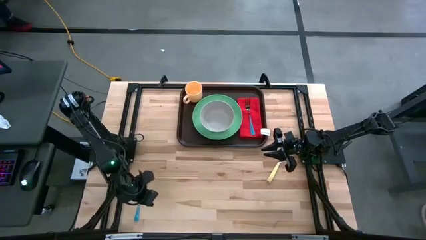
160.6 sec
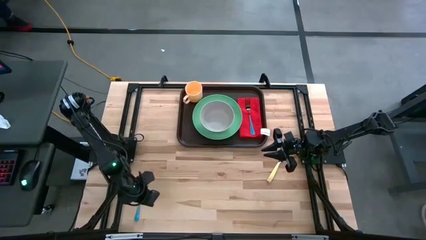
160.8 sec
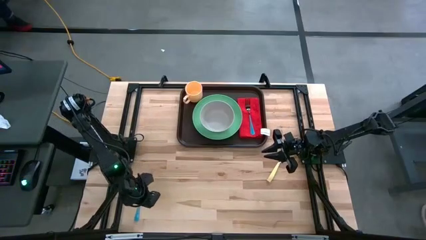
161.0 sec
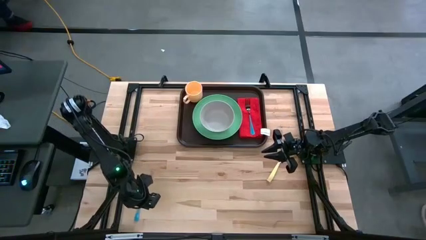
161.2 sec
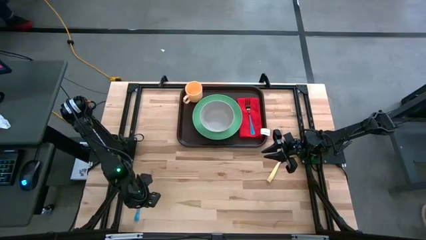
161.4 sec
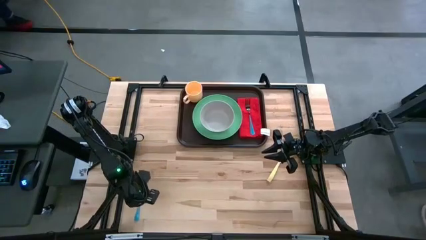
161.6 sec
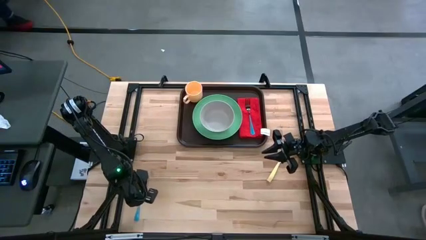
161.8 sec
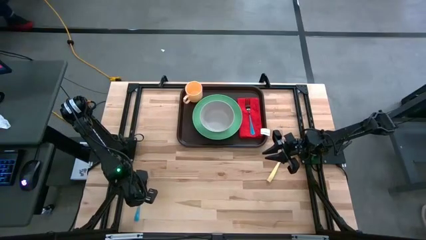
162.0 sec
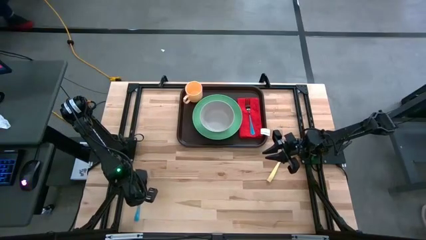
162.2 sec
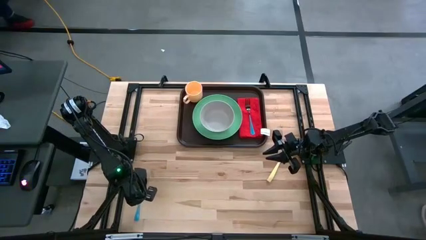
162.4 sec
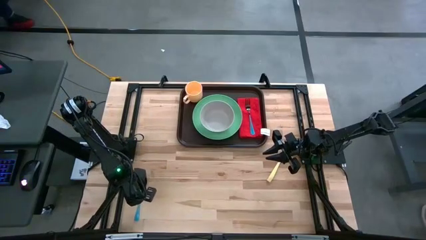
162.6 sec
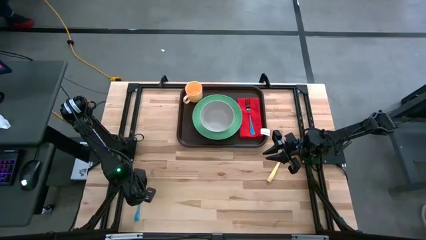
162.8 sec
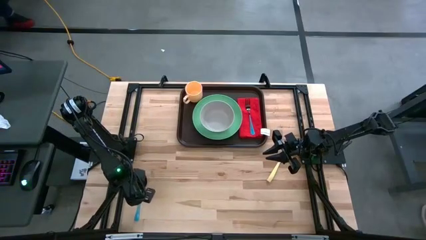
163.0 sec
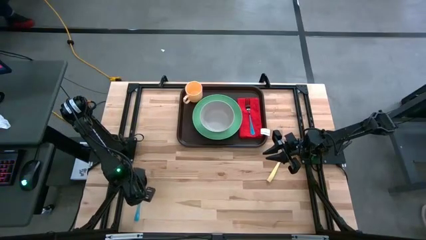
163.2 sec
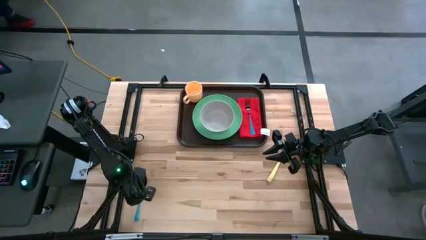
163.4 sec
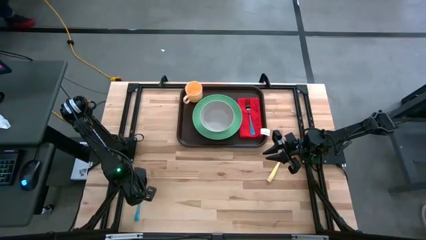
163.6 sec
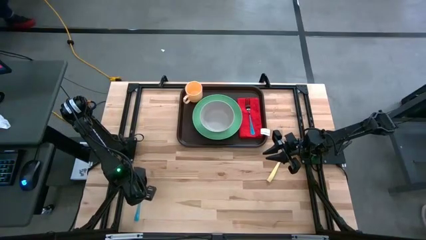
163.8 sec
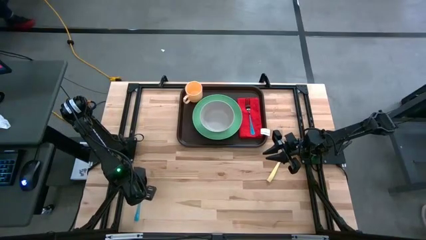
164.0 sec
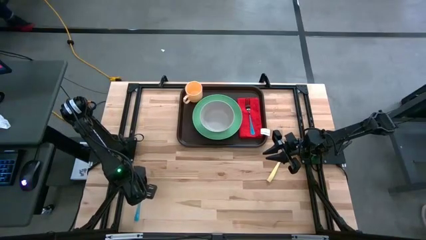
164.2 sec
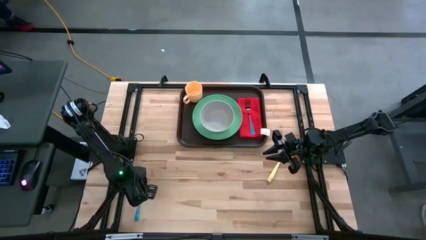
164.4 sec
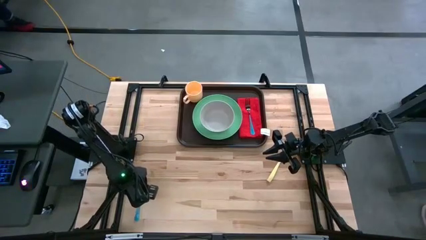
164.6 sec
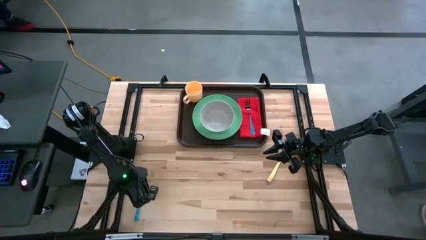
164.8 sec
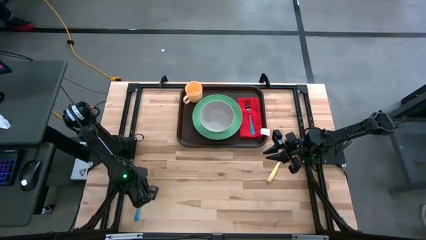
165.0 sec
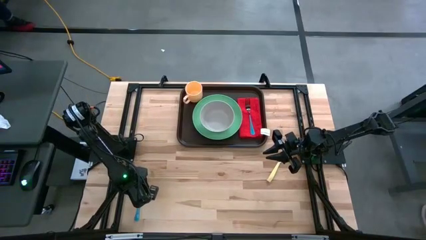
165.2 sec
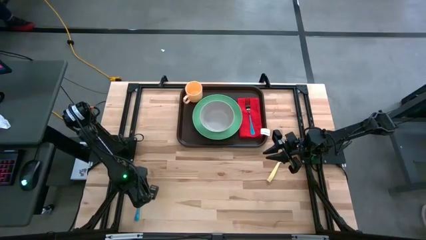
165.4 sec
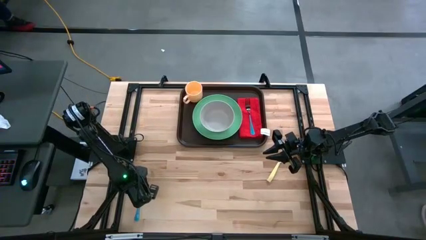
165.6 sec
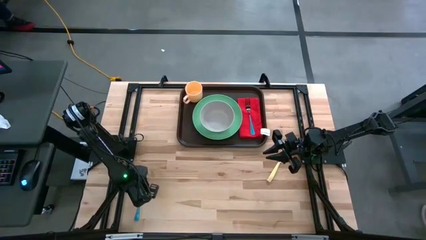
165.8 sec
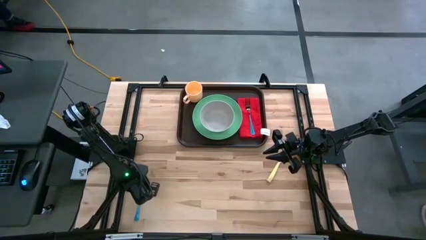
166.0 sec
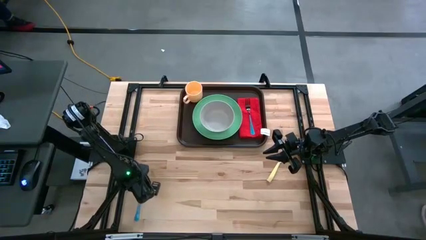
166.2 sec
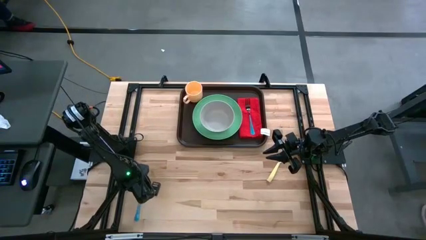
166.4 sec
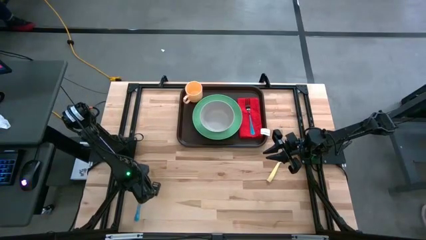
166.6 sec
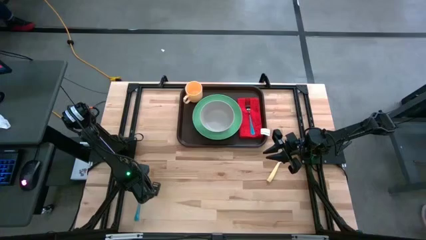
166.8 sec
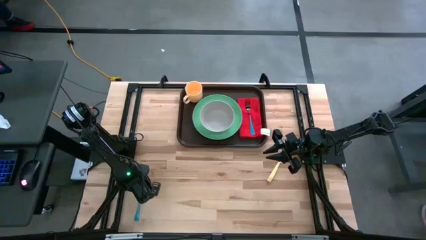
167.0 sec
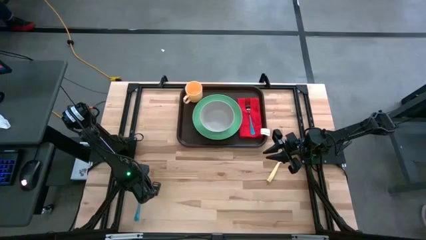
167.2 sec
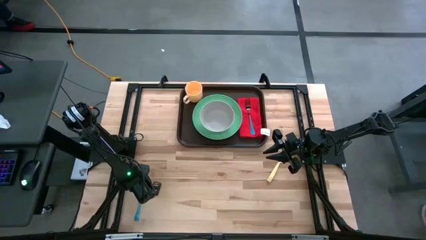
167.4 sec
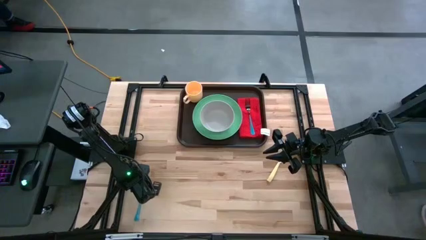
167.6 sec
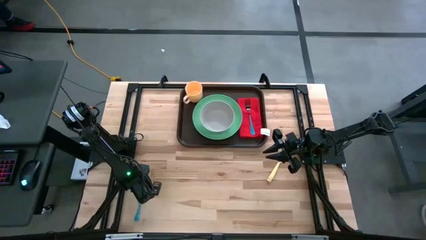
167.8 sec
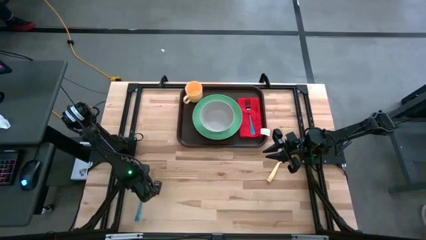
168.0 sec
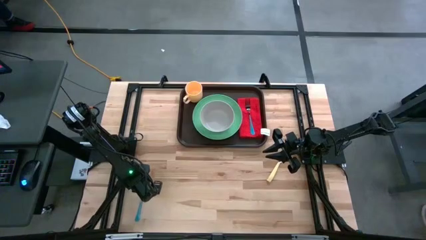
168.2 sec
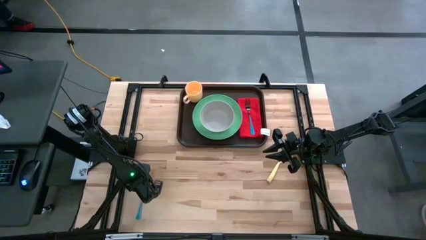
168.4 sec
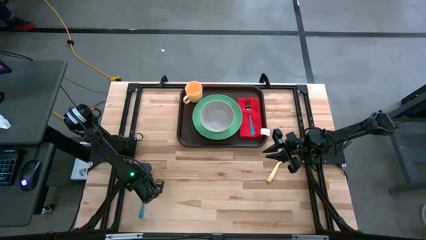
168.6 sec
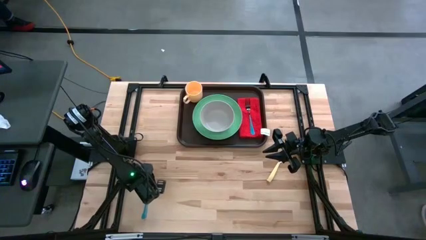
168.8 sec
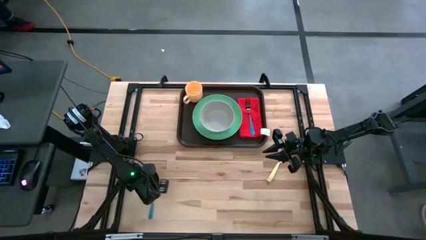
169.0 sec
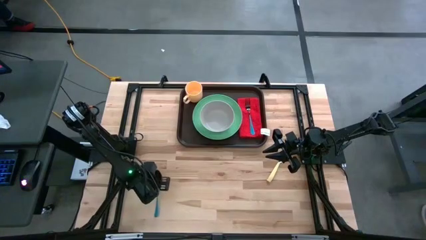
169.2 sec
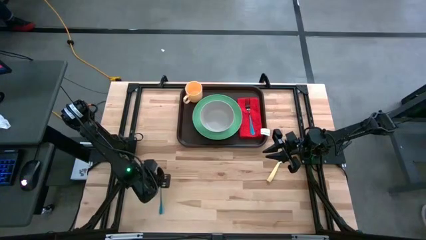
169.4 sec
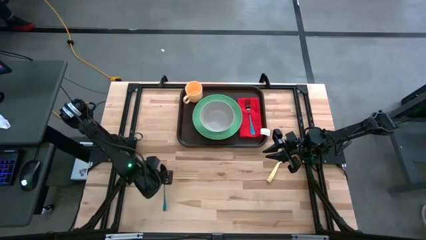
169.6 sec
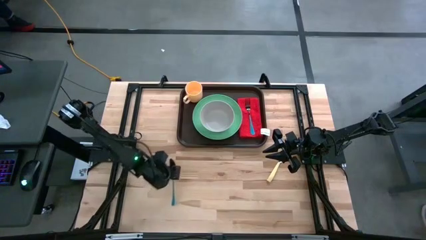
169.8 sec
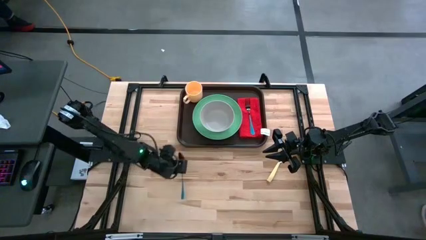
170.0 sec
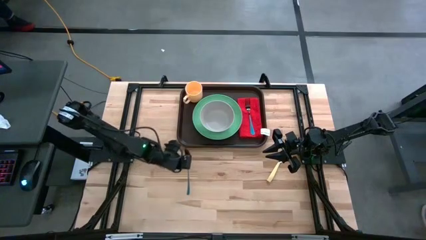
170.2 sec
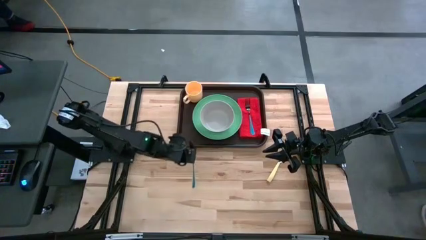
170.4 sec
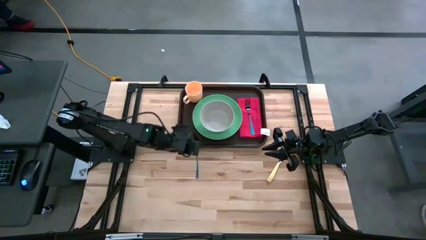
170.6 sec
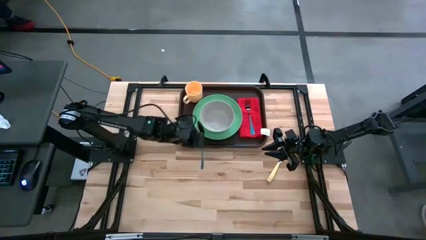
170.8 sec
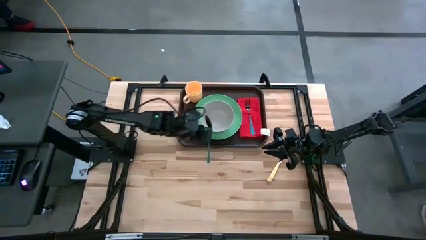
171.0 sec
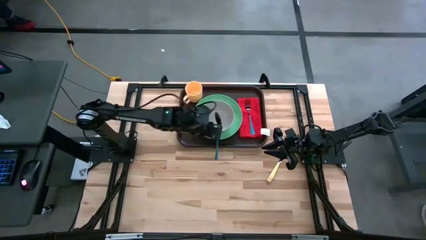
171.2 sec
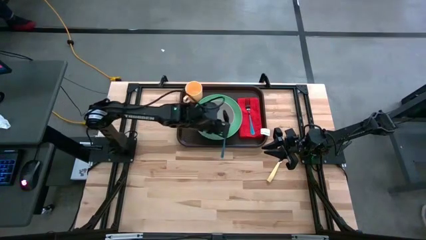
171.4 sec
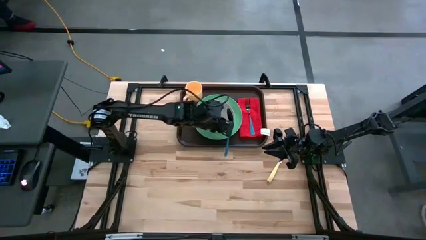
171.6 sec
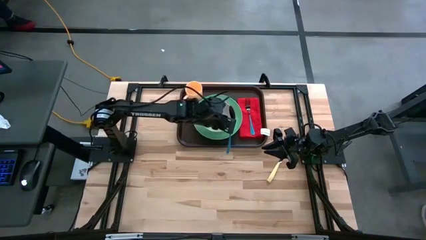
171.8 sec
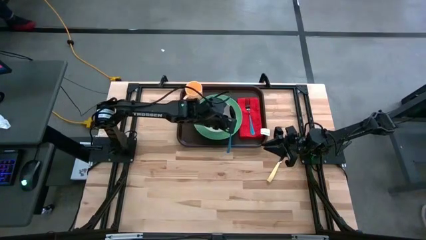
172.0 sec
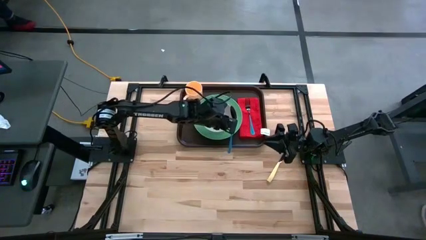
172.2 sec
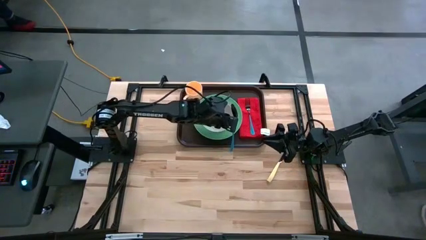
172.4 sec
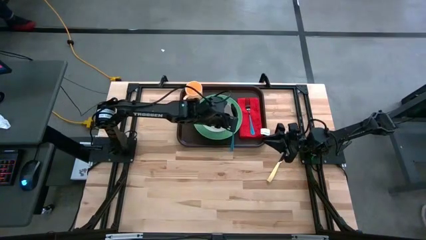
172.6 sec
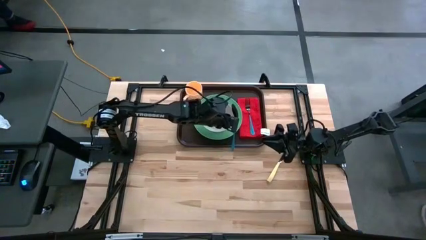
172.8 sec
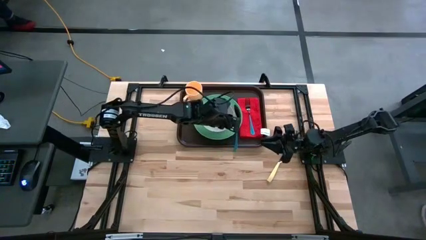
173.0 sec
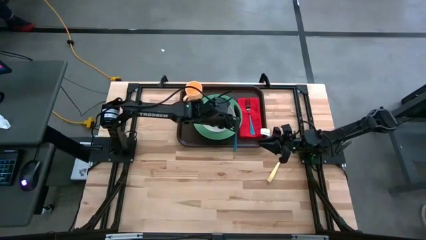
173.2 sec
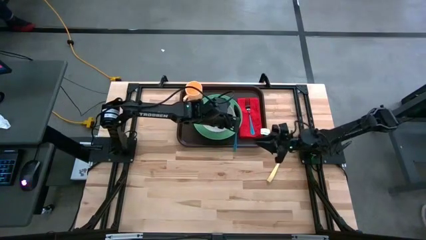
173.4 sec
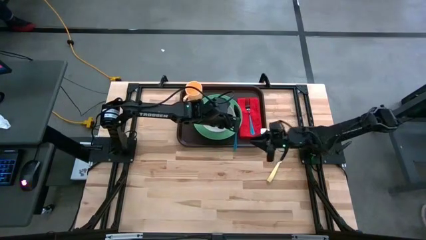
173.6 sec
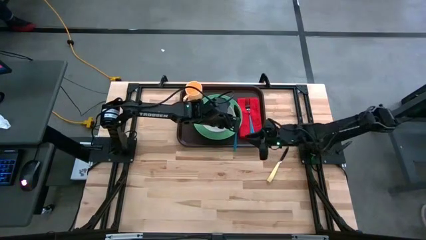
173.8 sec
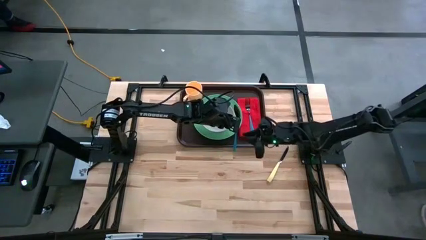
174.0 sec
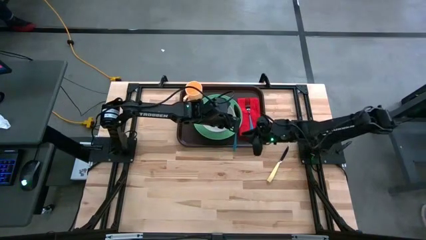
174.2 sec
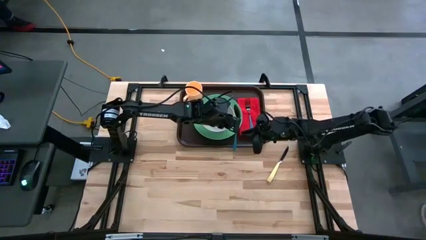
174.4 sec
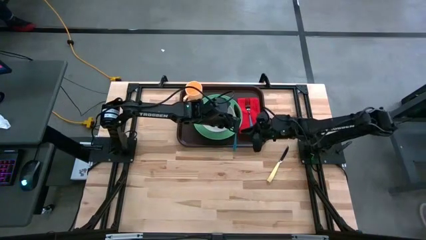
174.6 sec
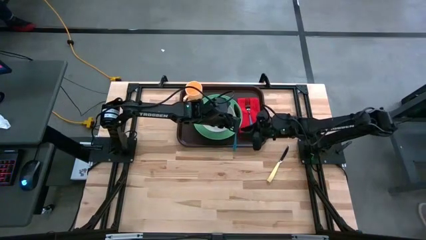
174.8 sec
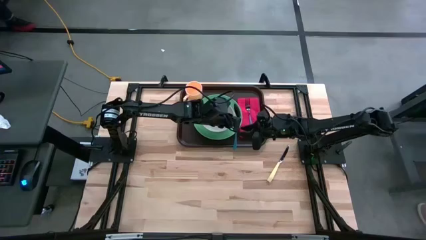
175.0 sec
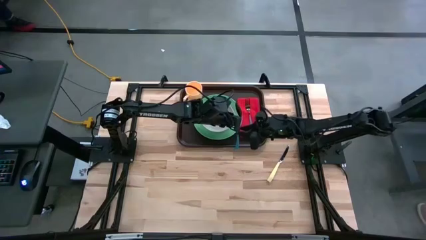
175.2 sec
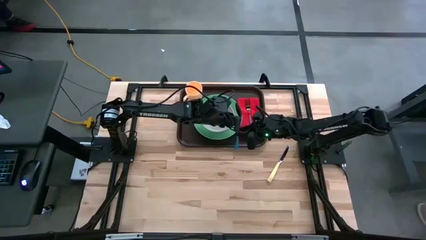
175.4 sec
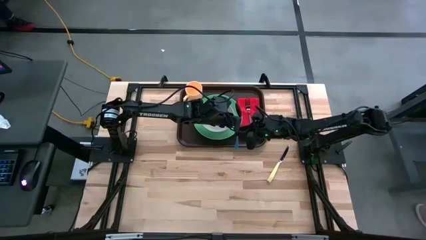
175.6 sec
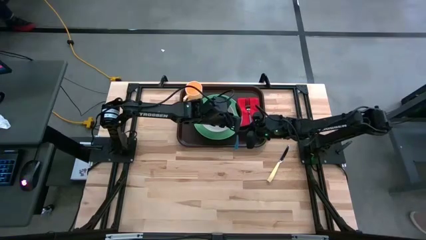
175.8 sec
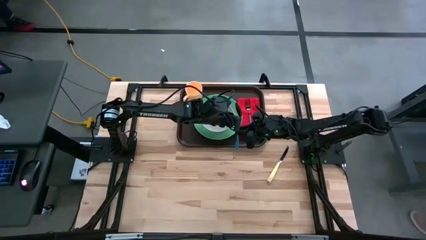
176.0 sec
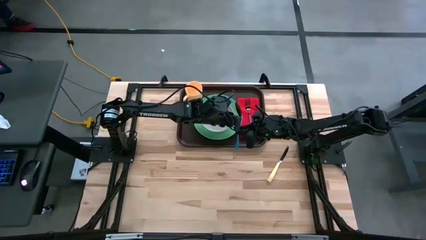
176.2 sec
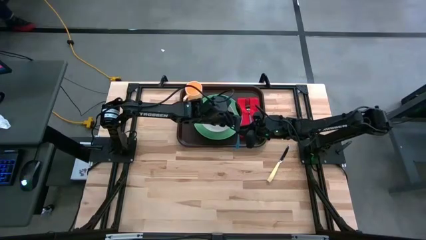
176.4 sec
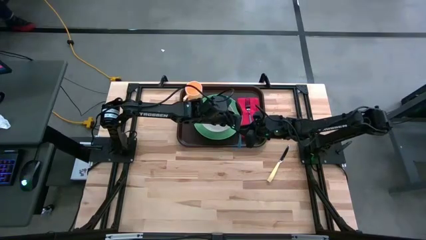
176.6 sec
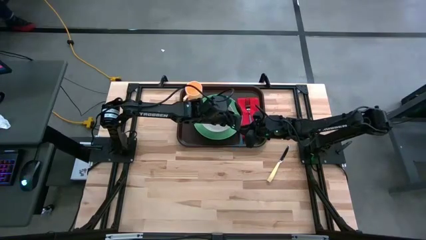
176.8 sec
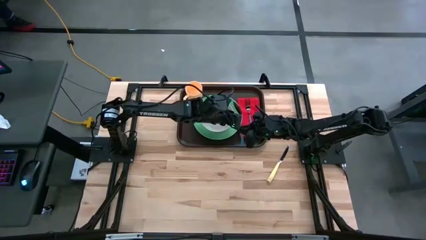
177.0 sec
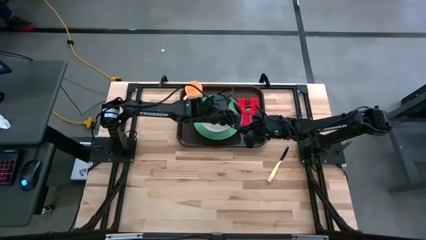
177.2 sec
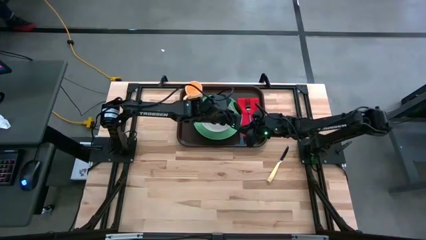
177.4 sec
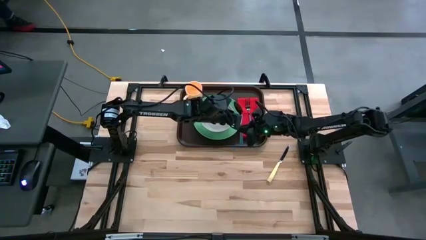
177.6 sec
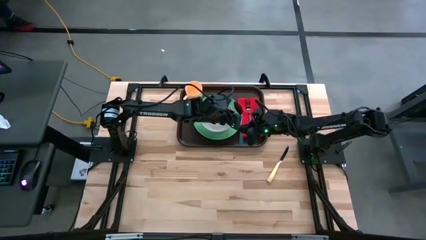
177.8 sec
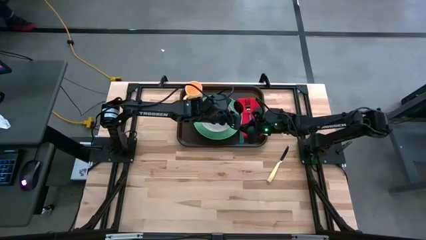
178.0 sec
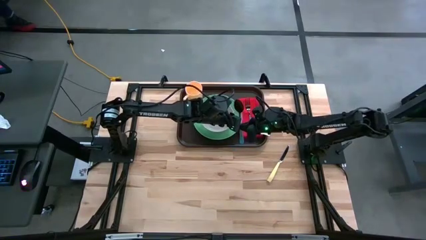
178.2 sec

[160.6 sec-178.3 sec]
Task: Set up tray
Put the blue spoon on the red table napkin to right of the green plate
